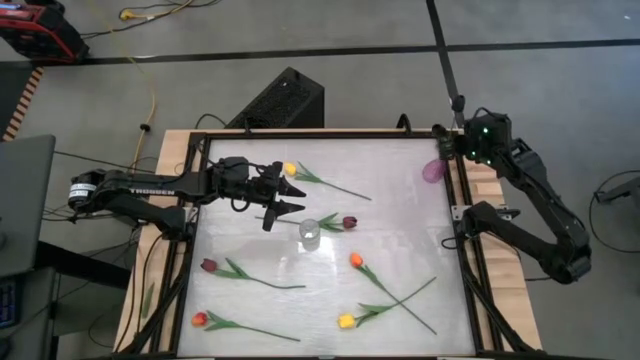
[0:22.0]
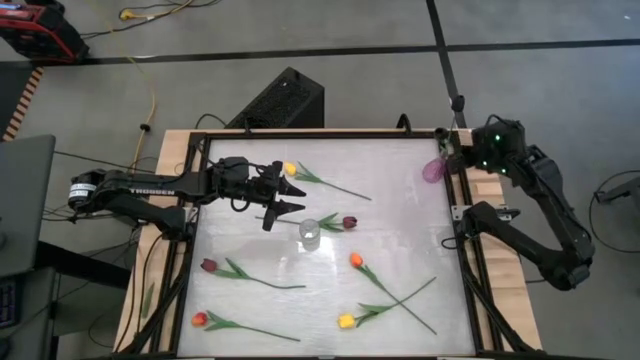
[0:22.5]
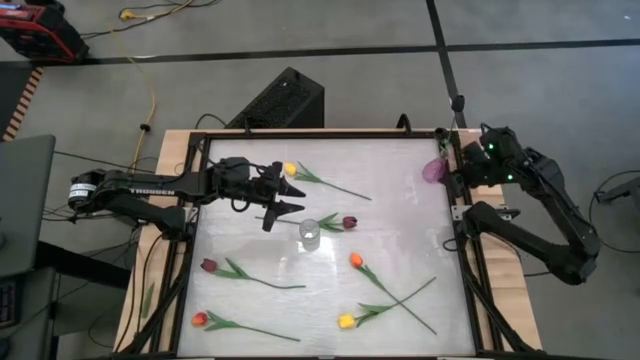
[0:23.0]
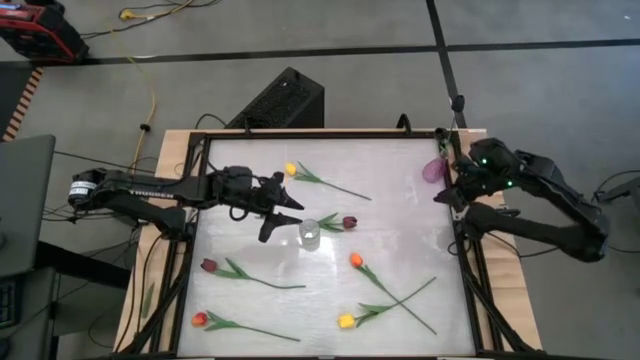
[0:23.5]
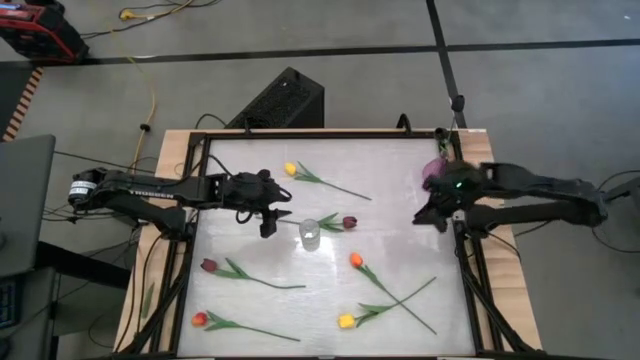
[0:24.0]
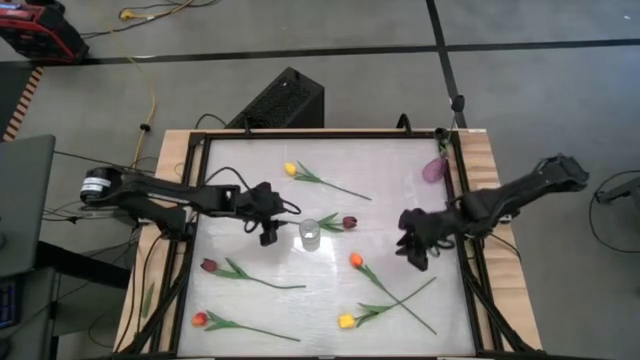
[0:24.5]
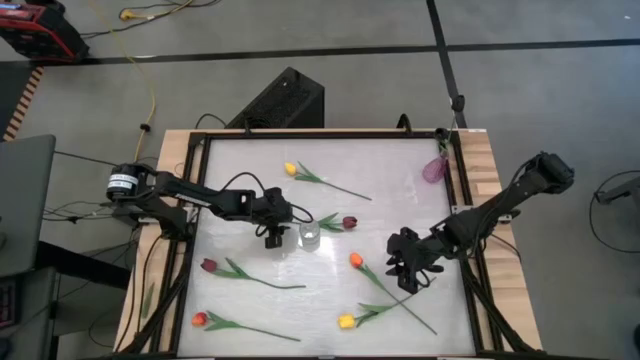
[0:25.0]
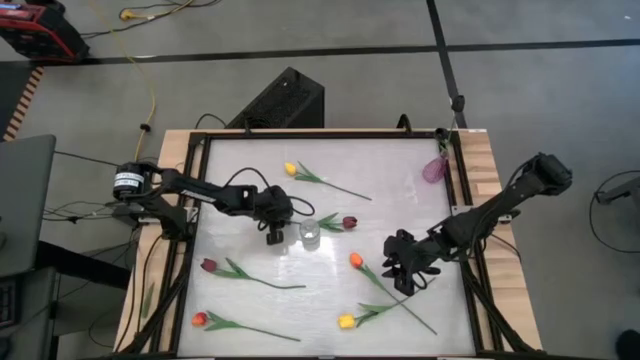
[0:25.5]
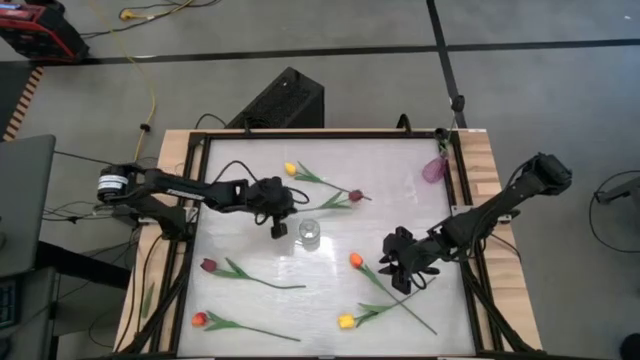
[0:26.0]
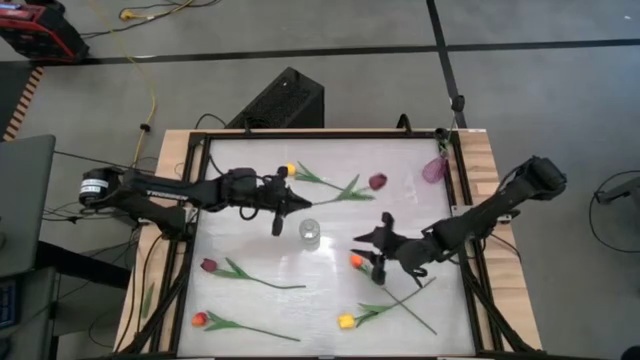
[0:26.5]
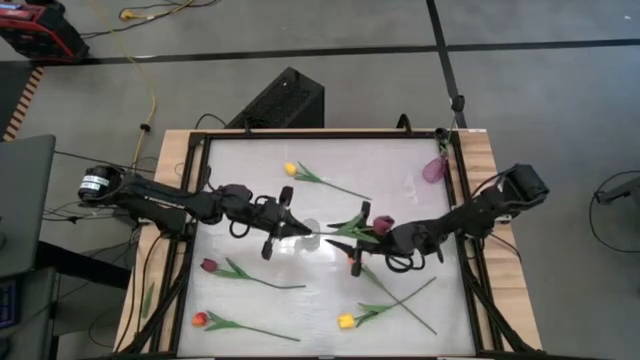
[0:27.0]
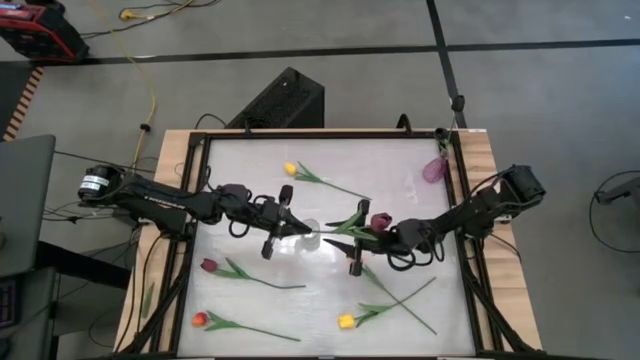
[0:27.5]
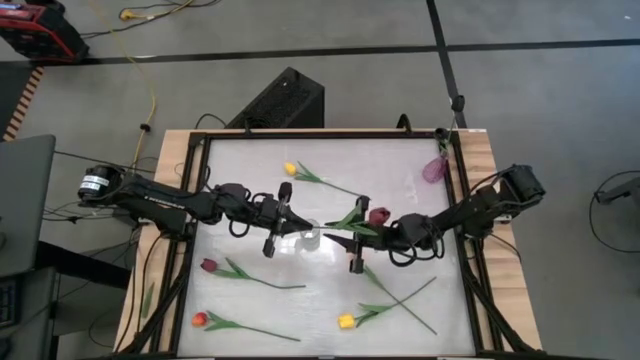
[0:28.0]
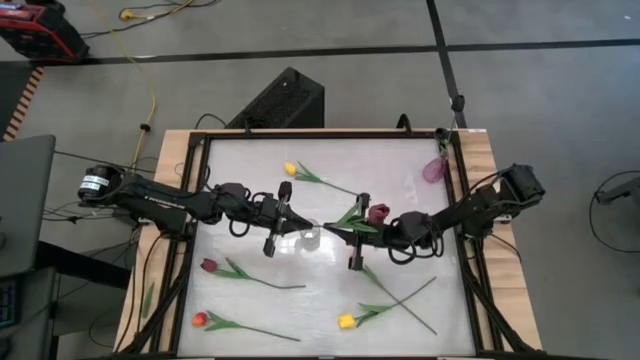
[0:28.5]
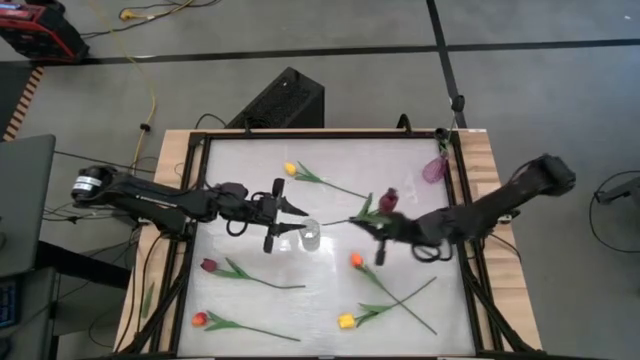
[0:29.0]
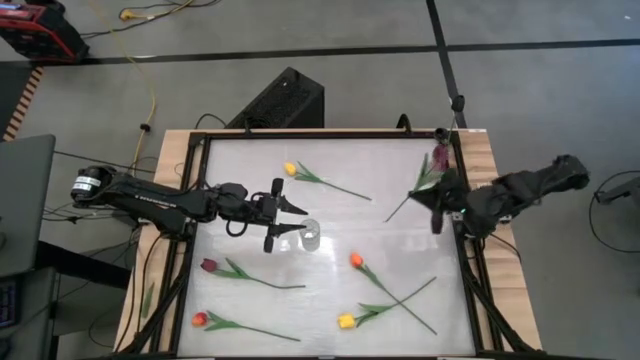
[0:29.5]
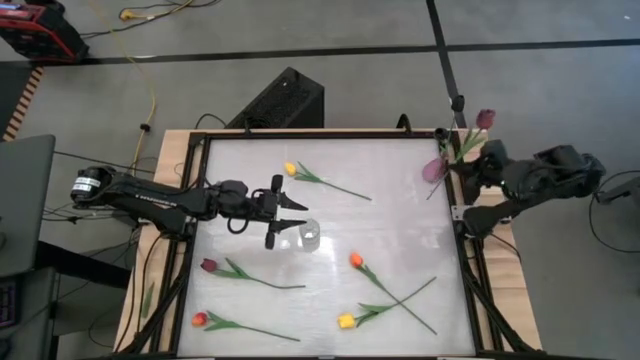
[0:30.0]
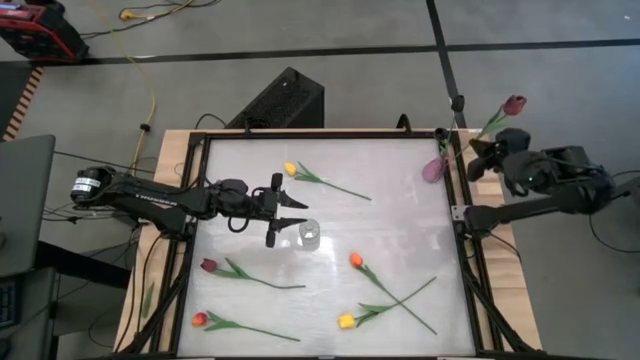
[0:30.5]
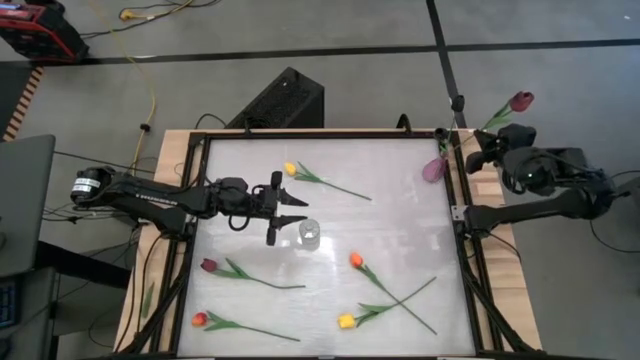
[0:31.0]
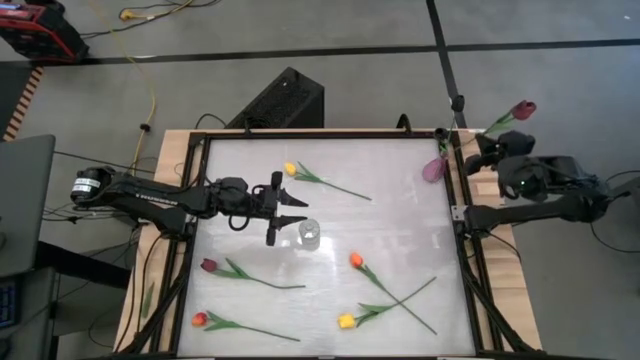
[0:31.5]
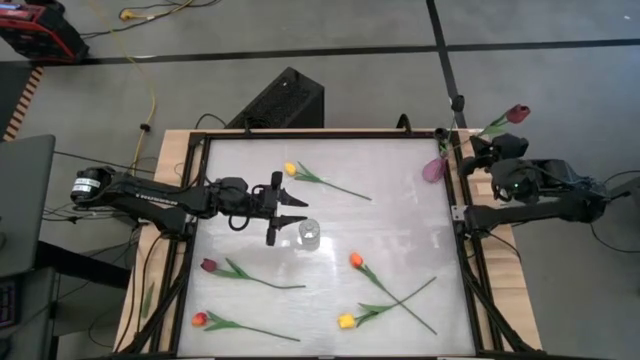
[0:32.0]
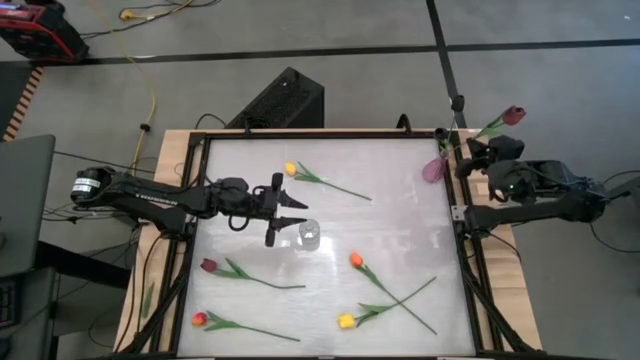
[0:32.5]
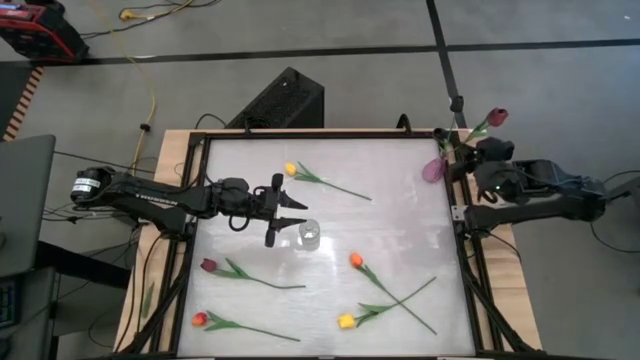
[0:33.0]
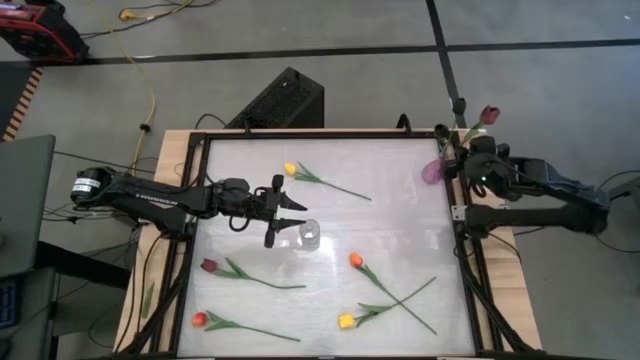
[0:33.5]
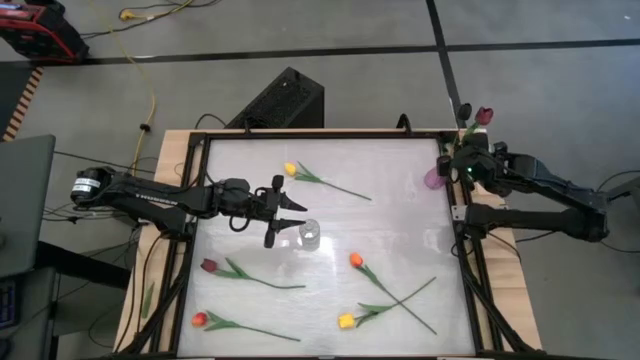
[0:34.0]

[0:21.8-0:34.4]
Task: Sort flowers into vase by color
Put the top red flower into the violet vase
